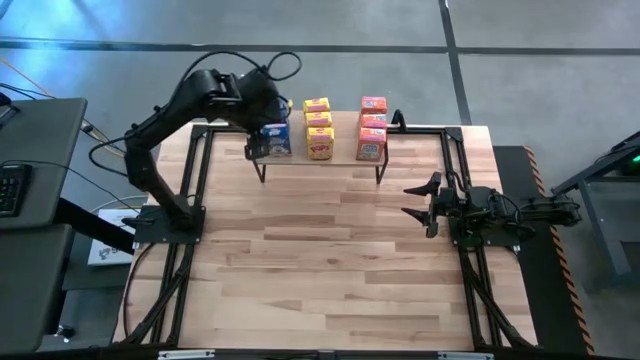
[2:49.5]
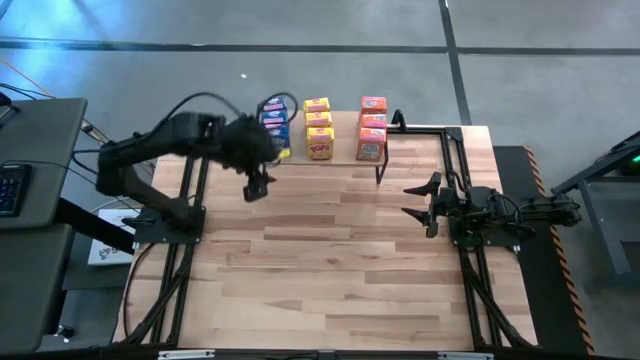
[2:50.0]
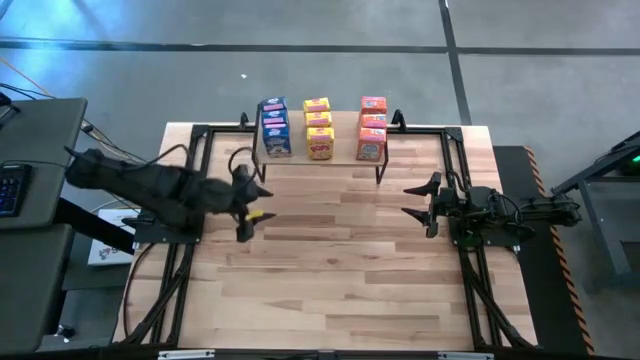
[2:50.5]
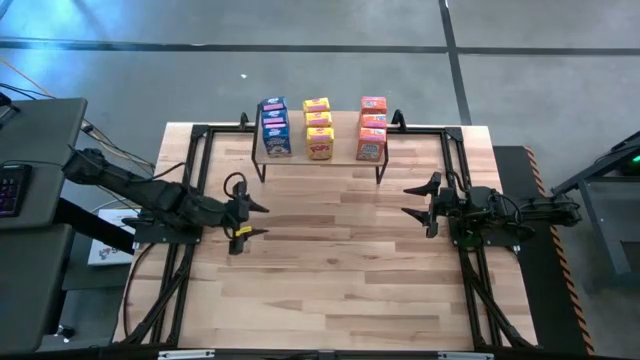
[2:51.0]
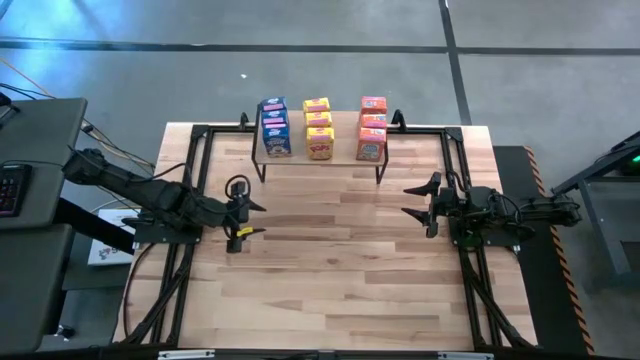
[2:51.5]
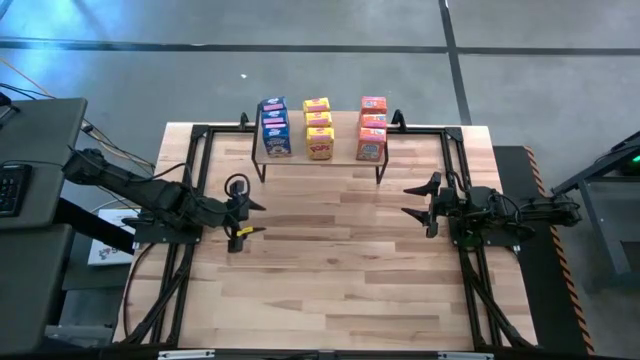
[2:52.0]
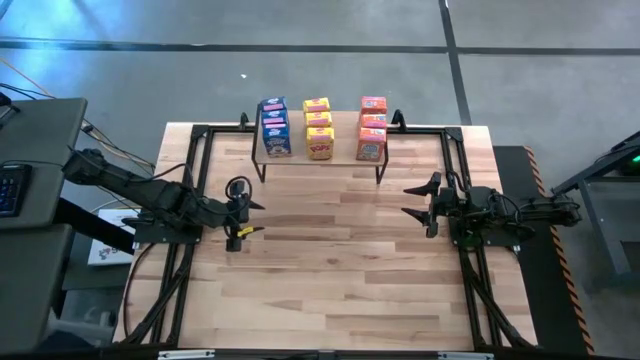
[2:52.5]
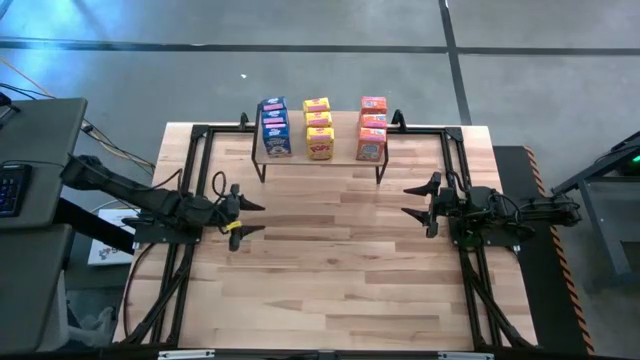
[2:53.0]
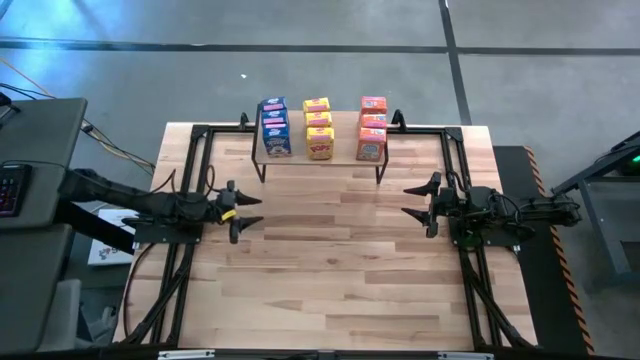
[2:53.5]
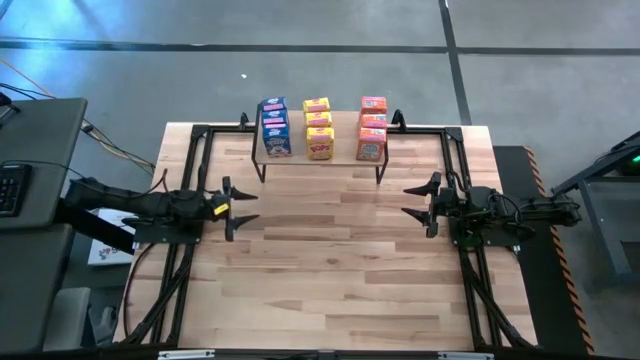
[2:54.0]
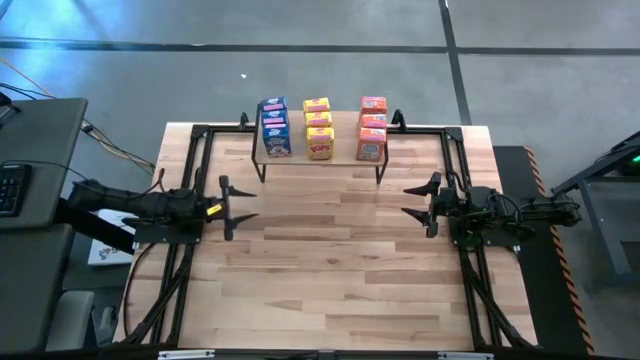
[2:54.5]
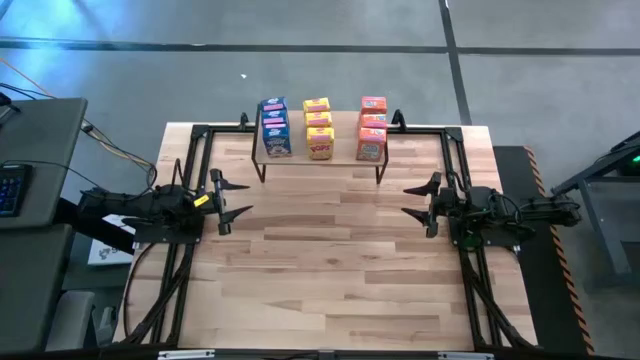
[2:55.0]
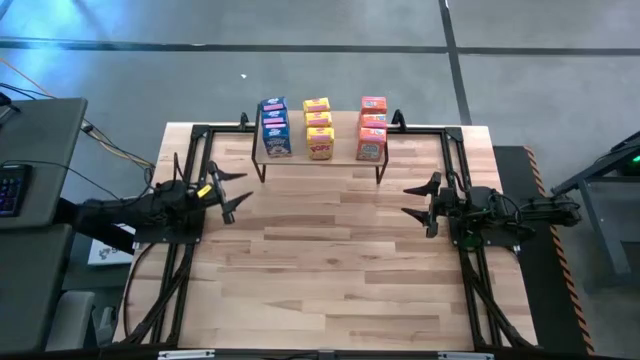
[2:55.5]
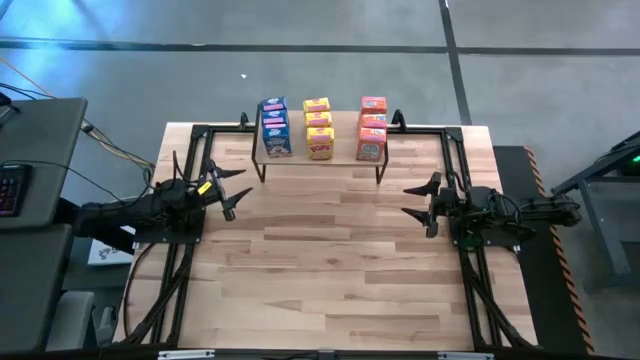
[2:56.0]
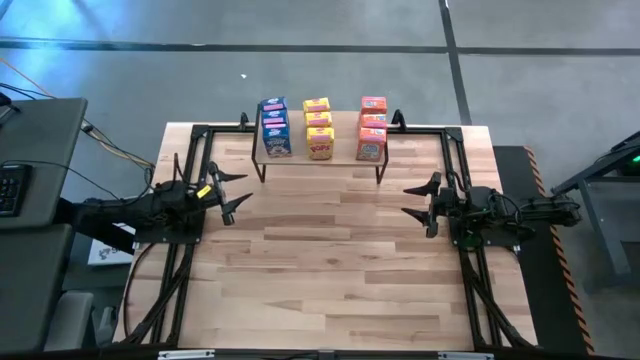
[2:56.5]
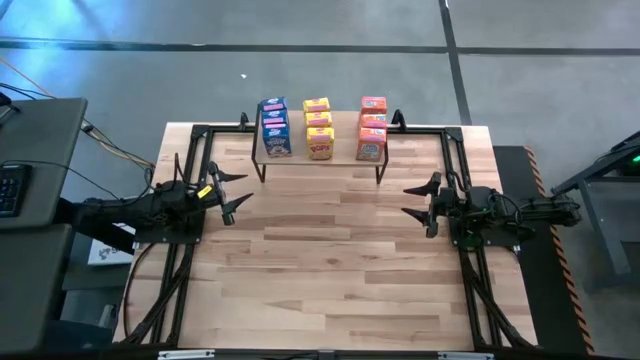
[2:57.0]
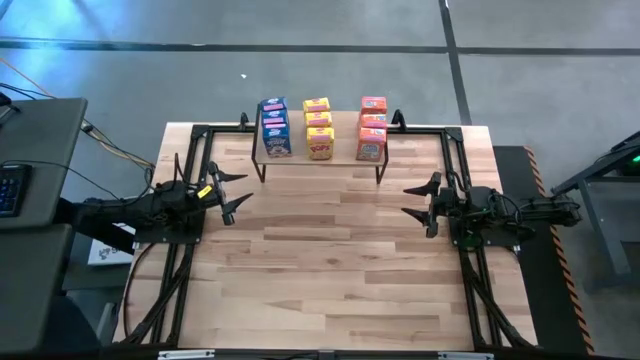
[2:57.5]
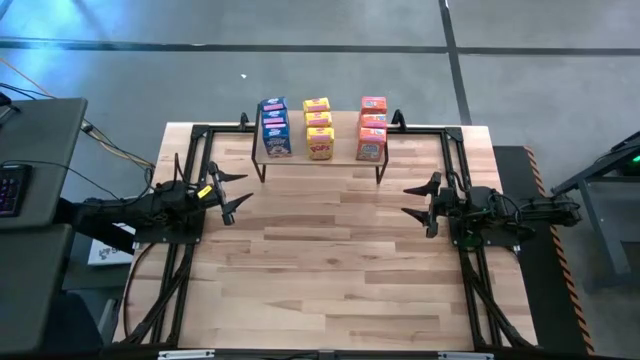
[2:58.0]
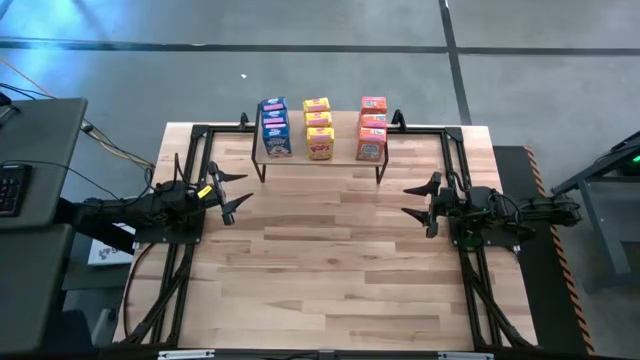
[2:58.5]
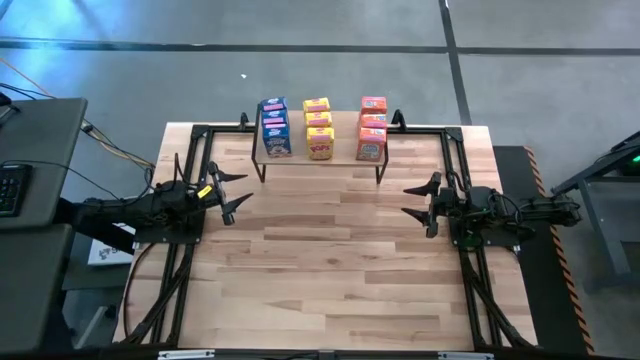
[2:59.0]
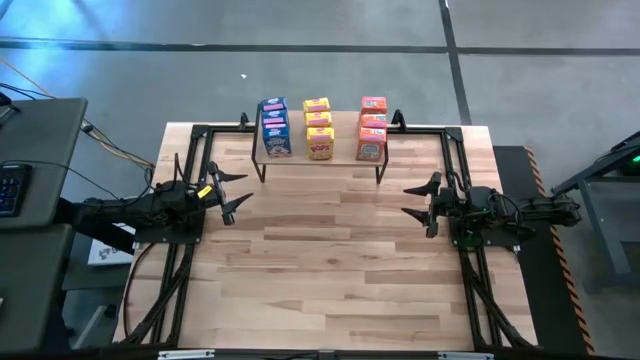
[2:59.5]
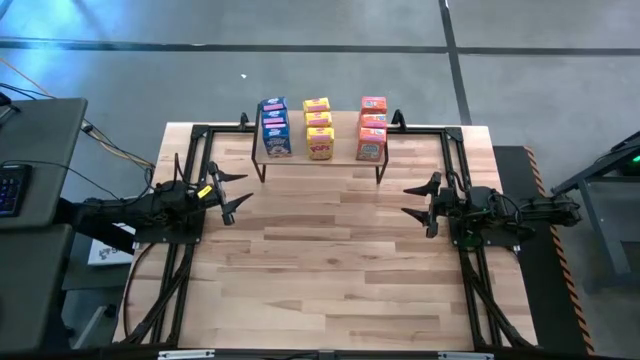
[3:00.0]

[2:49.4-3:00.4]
Task: Stack cereal on shelf
Return to Home Position

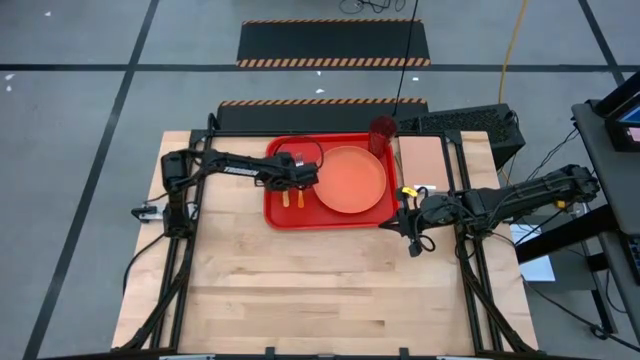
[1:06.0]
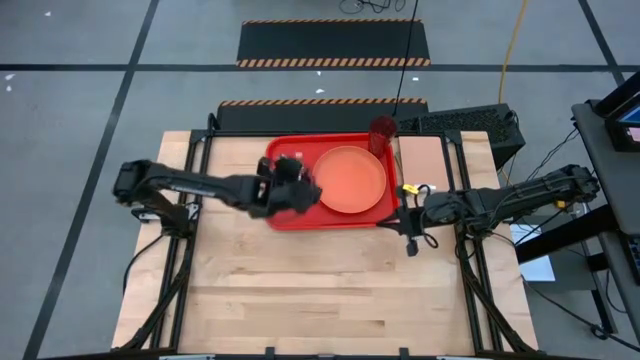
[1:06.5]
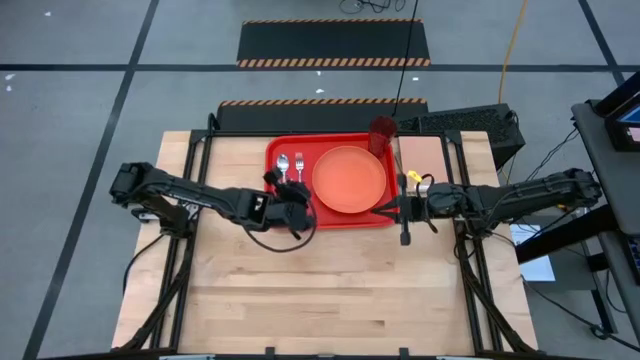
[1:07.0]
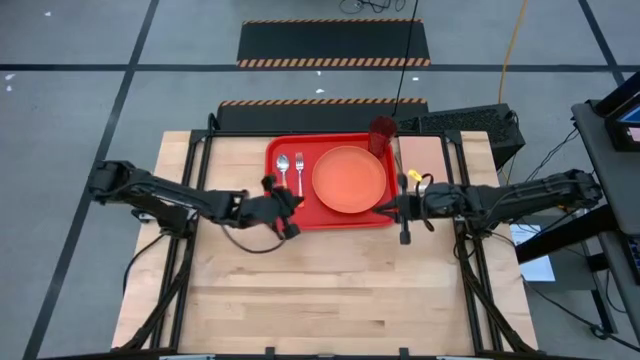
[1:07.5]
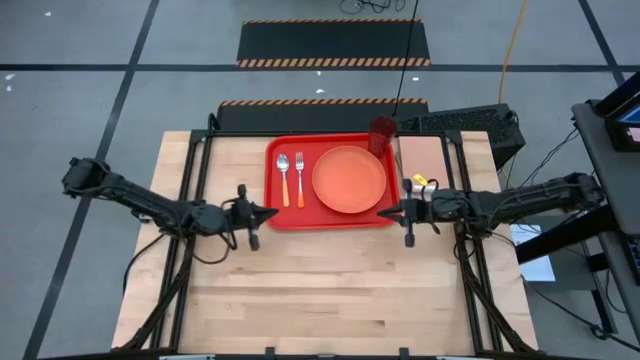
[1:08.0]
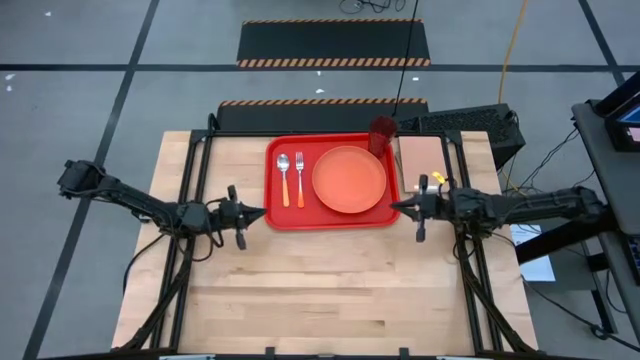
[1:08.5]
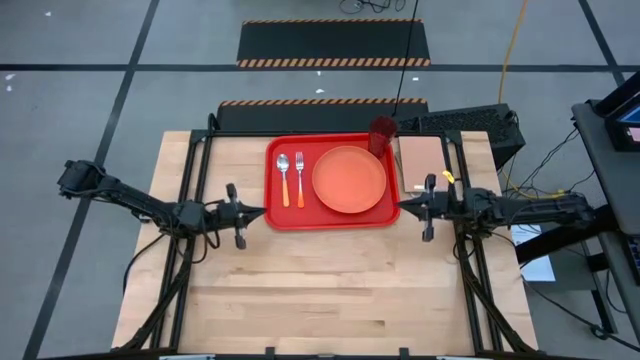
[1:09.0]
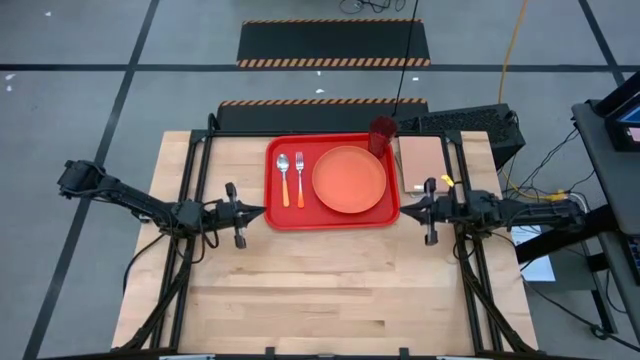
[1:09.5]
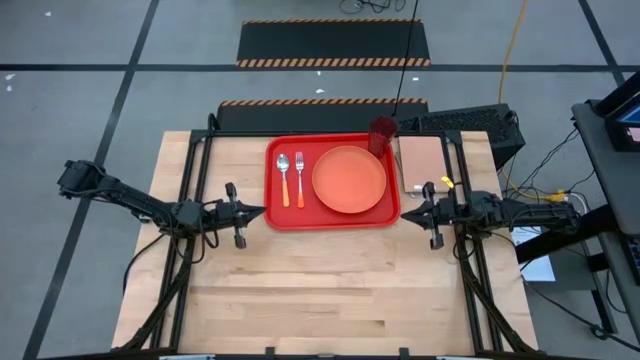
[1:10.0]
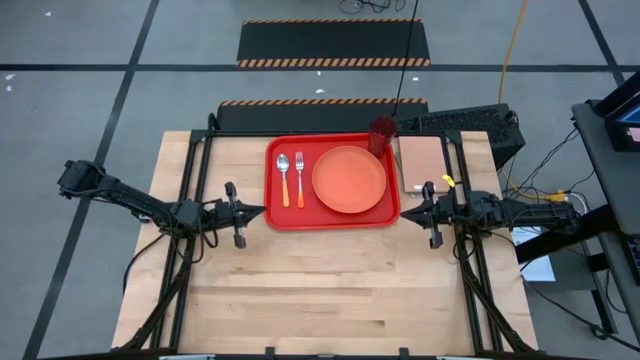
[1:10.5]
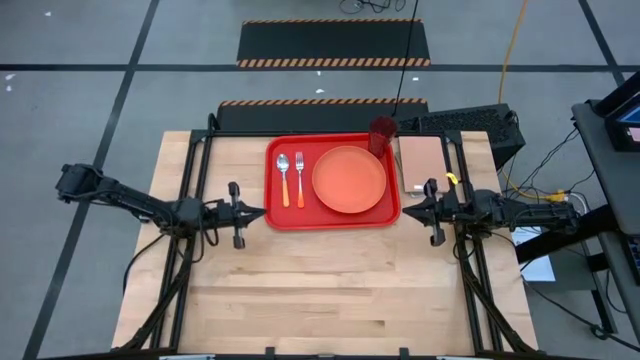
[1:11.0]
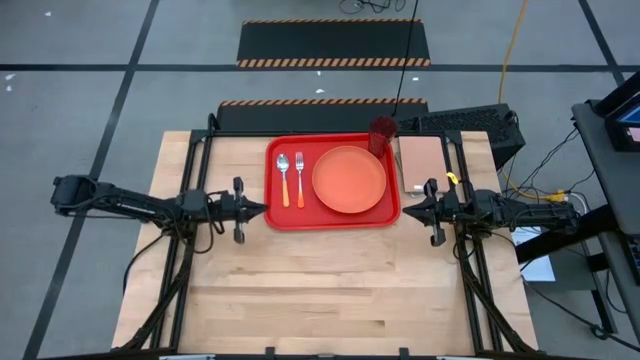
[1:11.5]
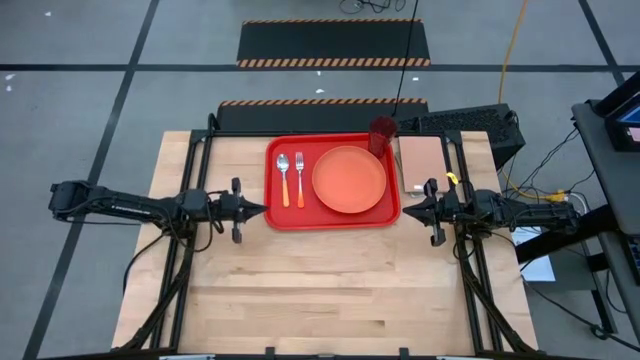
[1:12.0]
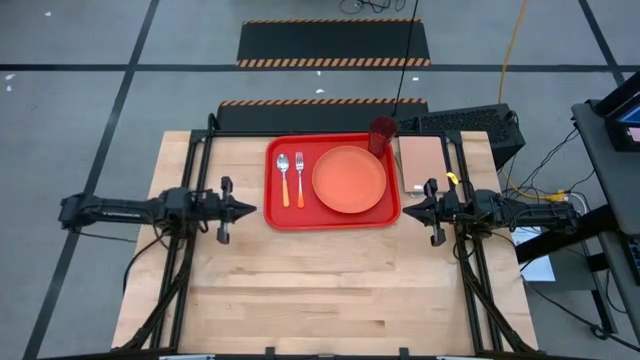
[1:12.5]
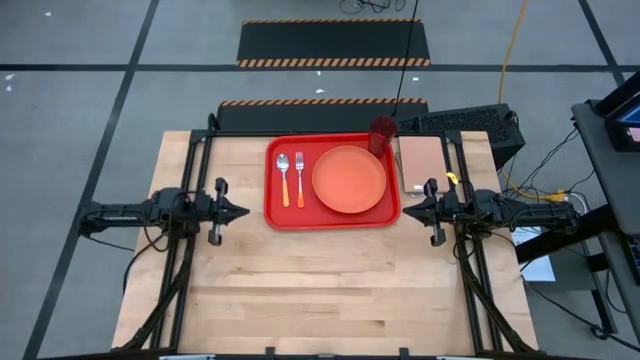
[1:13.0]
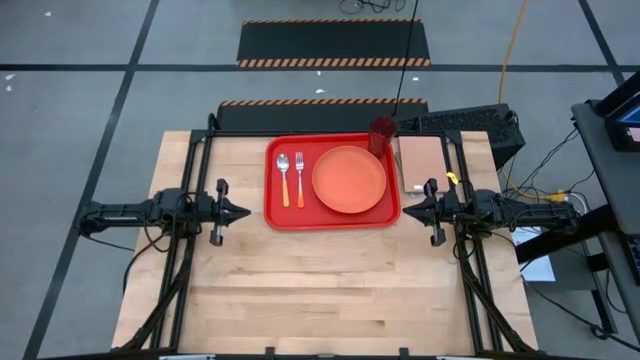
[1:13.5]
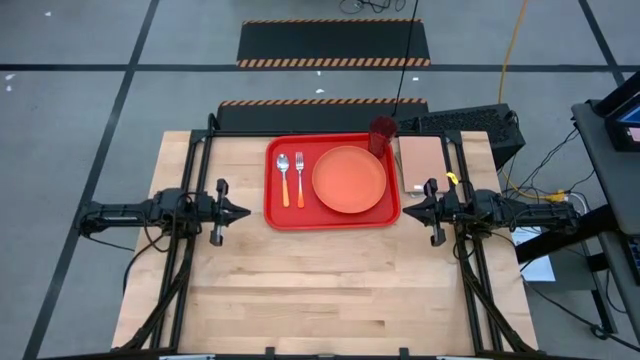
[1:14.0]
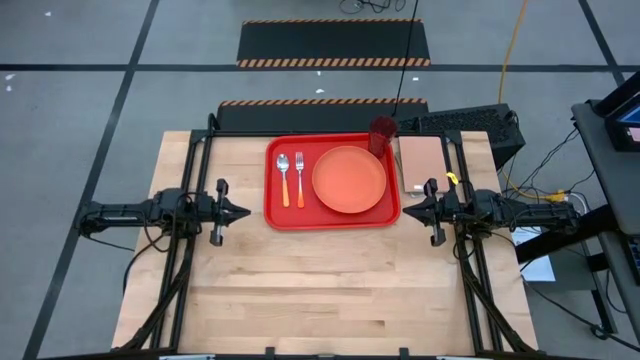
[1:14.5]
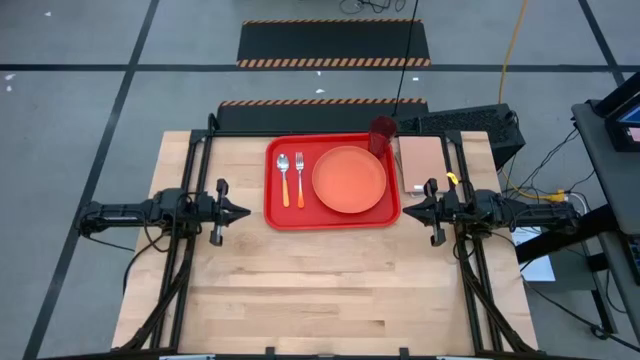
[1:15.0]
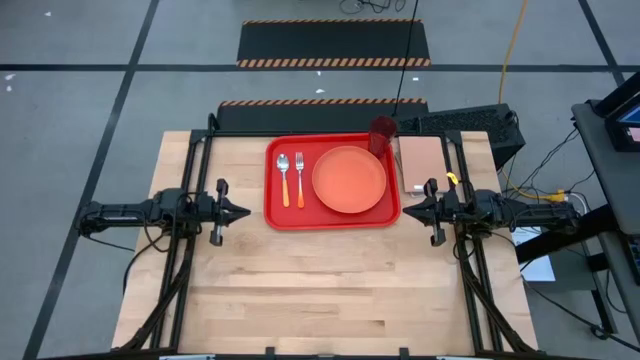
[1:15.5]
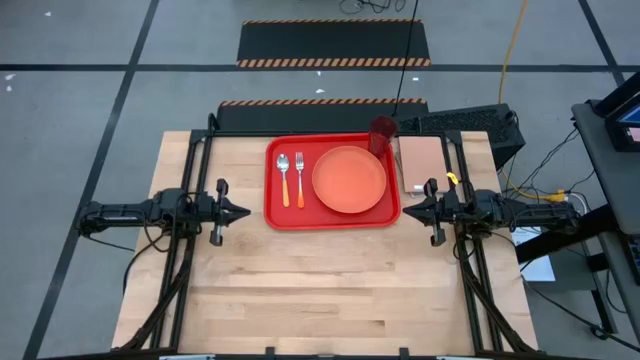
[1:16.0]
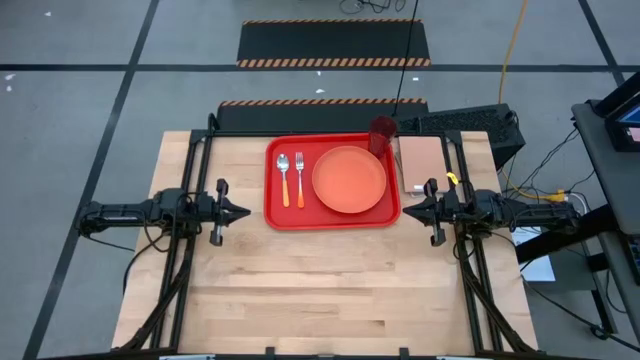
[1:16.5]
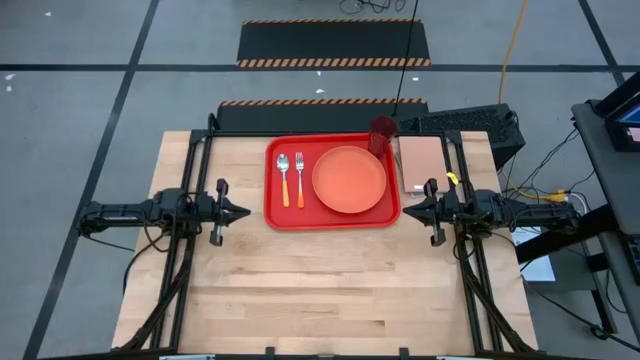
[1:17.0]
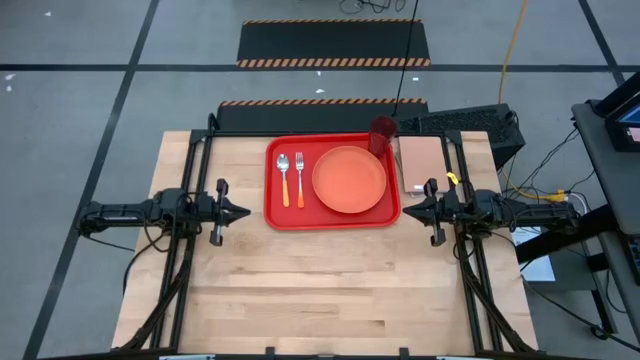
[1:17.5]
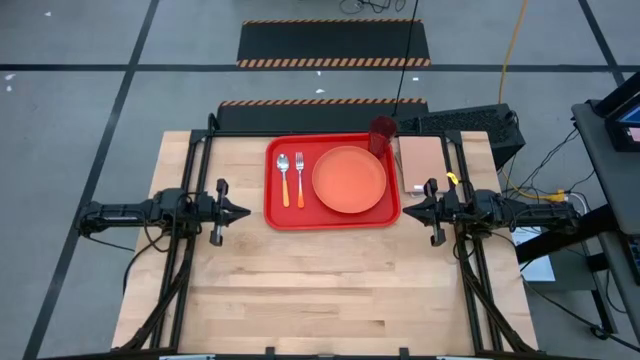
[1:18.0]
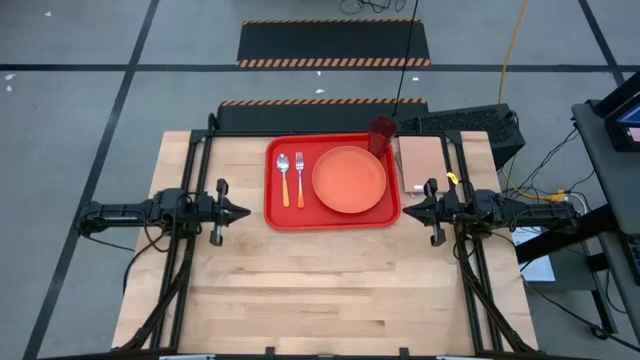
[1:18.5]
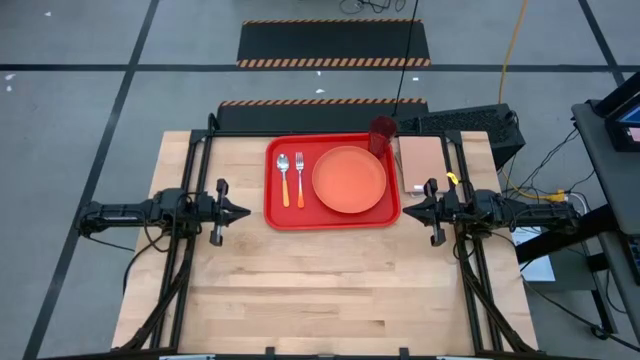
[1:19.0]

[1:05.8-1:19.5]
Task: Pick and place plate/cup/fork/spoon on tray
Return to Home Position
